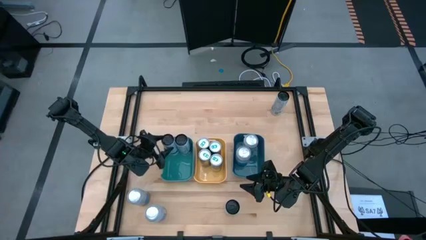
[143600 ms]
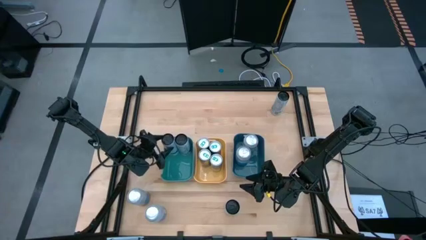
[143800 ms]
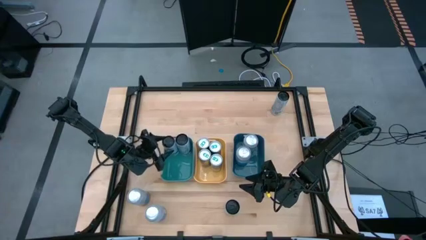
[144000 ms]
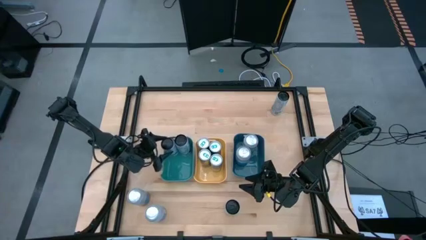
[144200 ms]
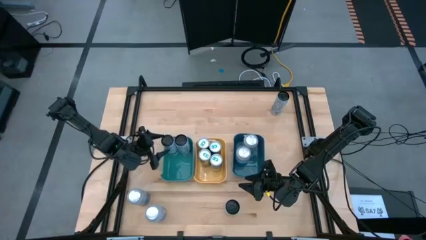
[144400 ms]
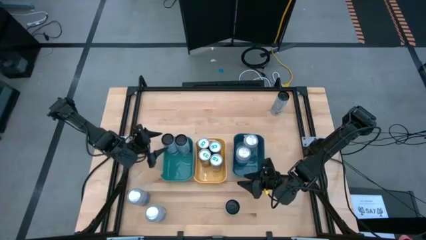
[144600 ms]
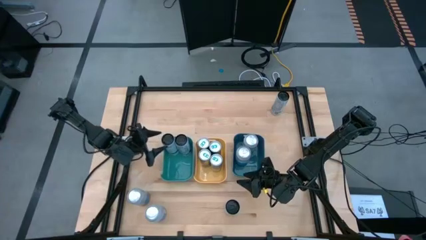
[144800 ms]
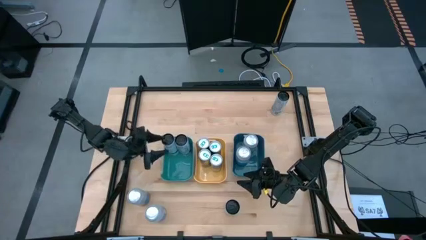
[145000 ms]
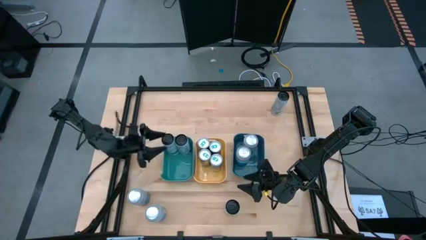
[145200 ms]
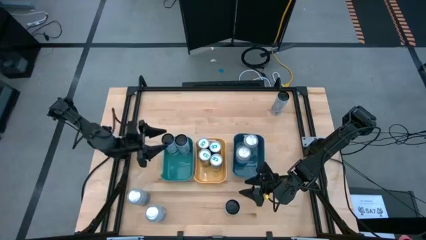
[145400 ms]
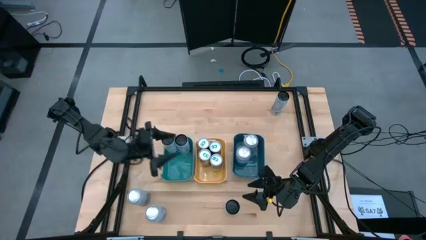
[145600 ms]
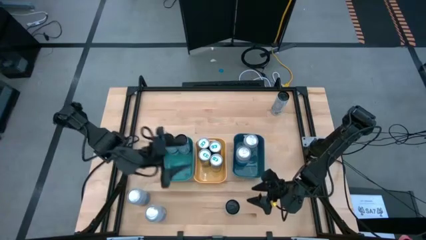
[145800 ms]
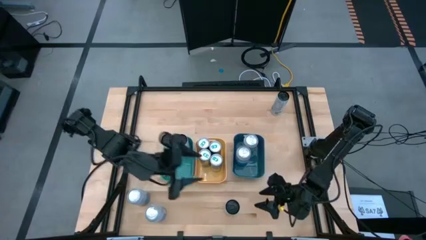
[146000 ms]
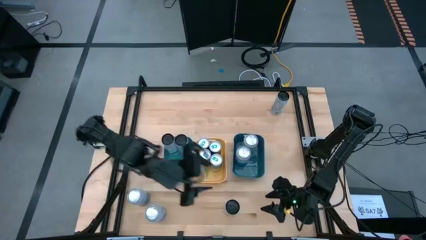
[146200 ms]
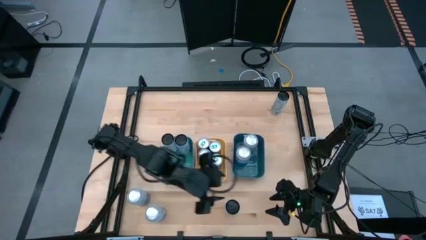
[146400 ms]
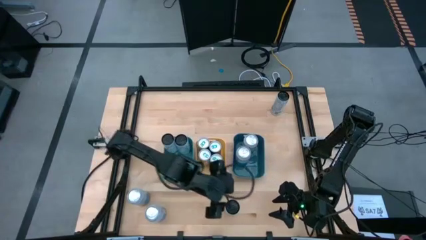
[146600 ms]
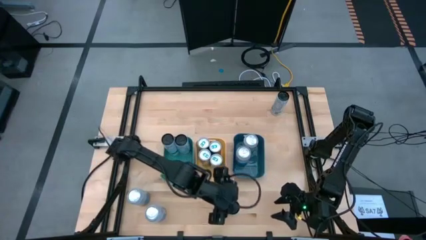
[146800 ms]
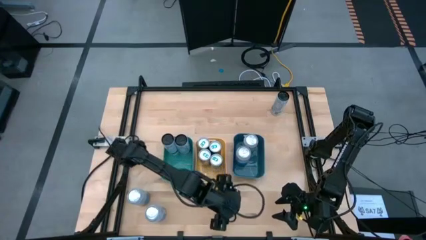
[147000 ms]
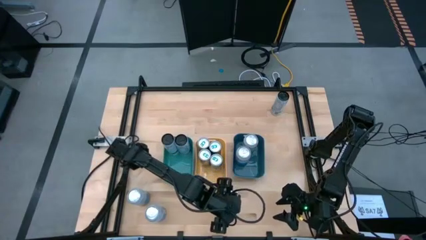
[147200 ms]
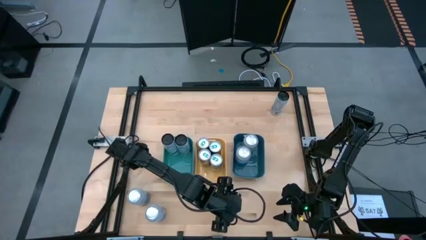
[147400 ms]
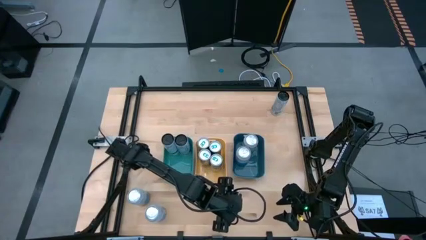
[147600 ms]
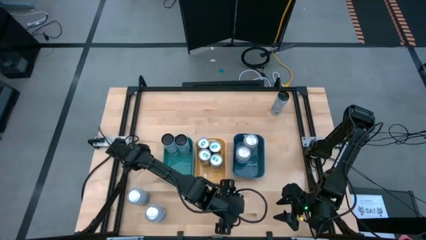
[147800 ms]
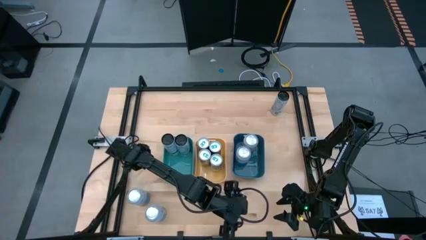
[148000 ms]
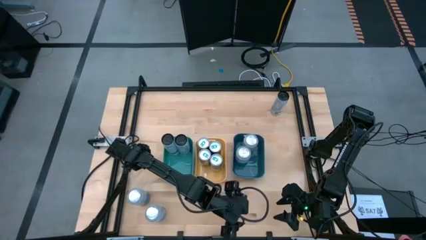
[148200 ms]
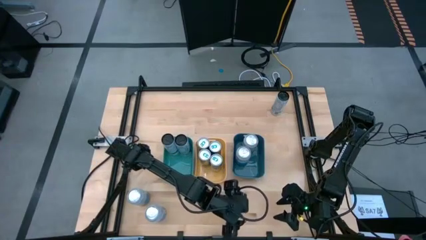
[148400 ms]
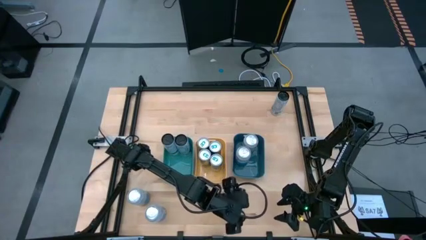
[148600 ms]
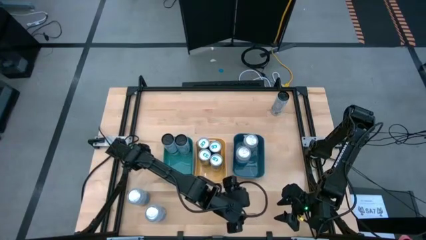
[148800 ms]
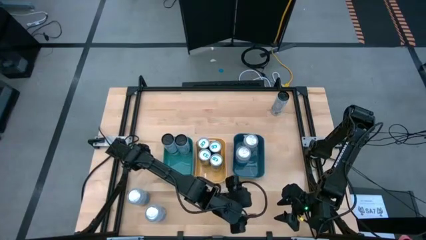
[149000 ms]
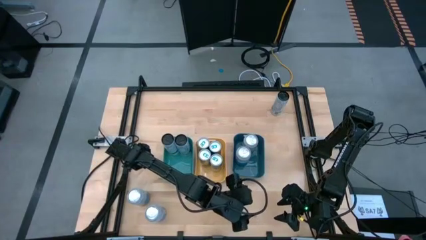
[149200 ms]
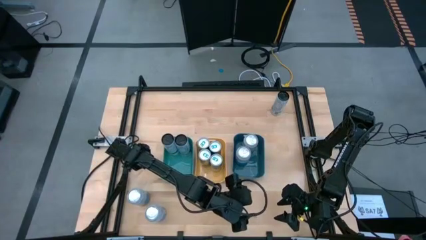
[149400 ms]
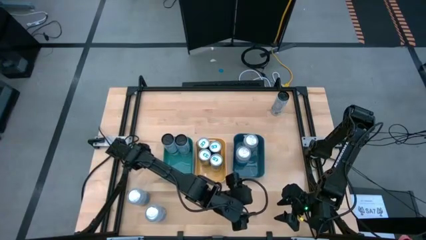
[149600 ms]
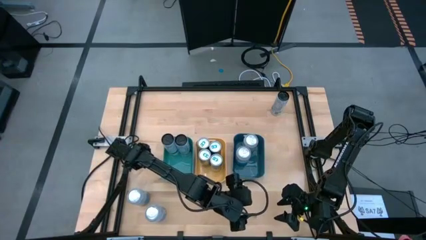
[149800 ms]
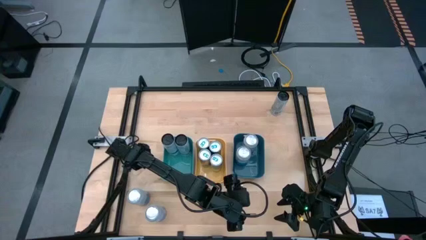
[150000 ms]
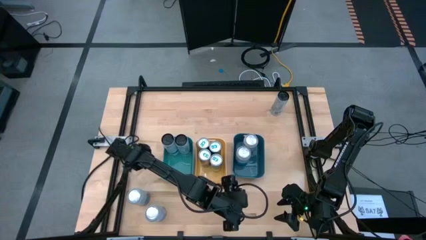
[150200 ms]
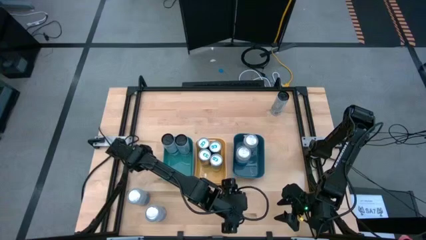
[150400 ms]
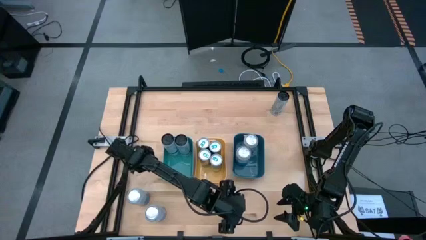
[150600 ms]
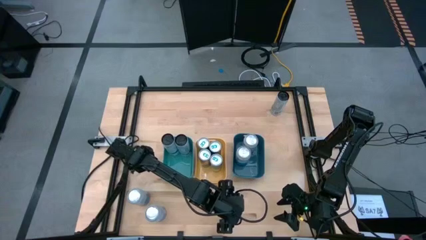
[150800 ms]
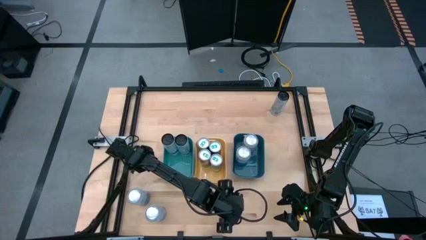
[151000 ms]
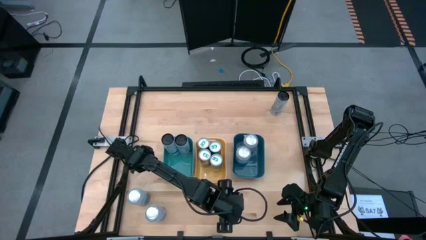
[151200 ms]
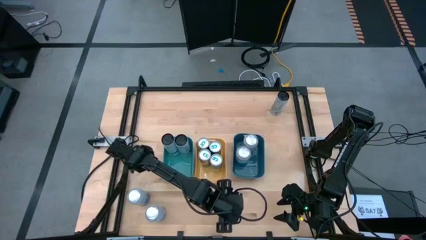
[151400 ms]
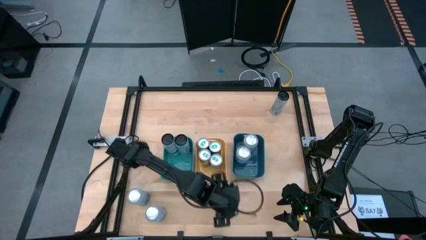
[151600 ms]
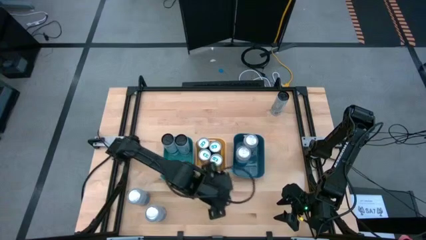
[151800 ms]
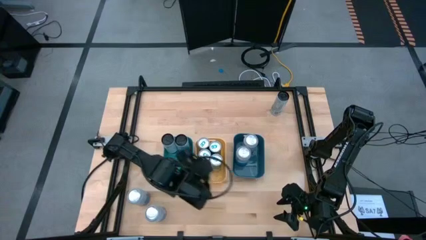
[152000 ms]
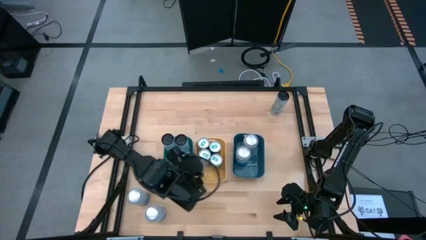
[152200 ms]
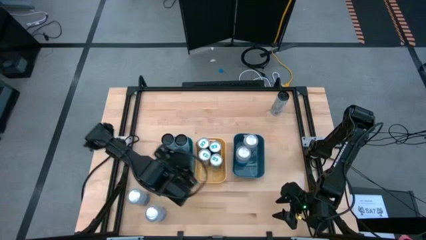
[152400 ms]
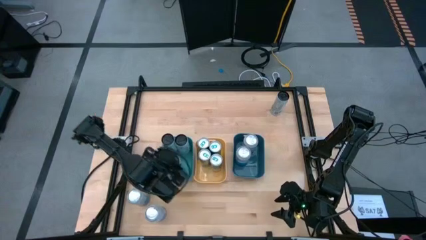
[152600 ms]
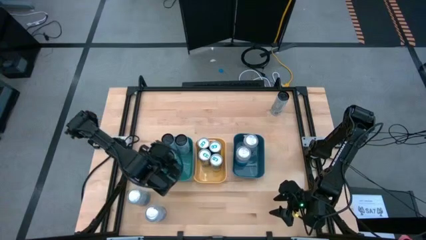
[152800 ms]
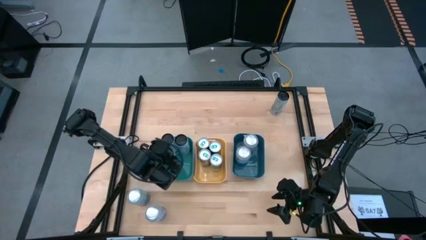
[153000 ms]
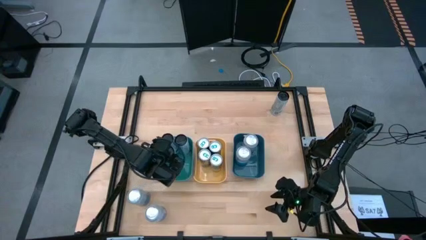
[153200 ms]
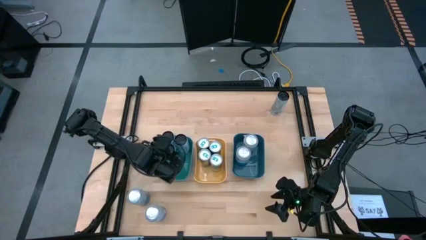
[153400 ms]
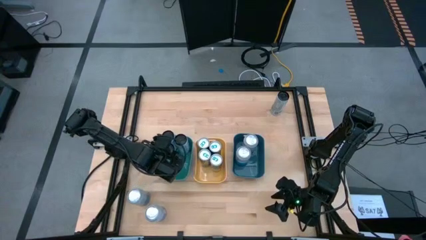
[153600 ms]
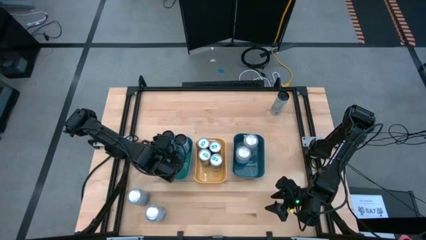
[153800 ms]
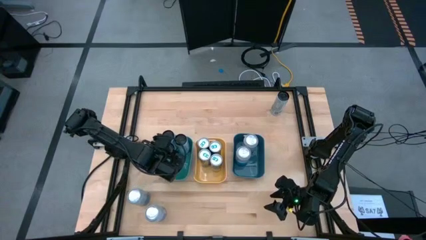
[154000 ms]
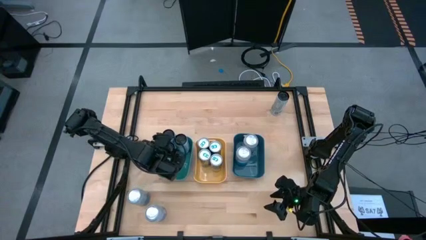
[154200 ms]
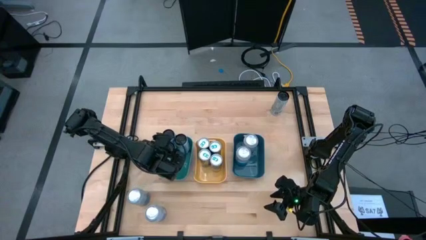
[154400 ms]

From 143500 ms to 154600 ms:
Task: Sort soda cans
Put the bottom left black can into the light green bin
